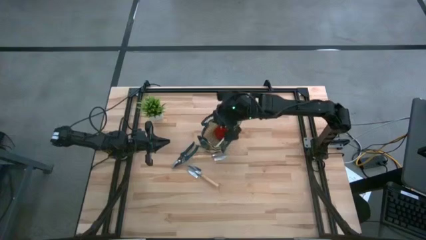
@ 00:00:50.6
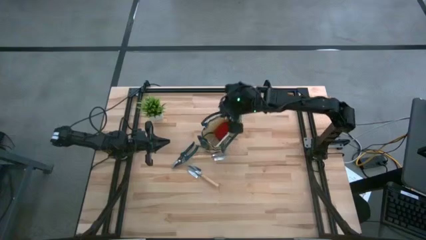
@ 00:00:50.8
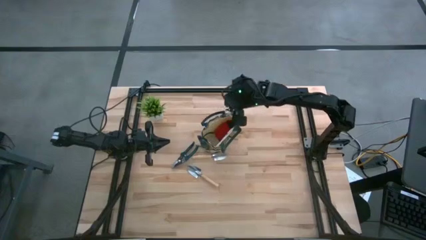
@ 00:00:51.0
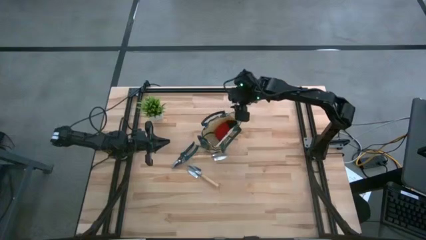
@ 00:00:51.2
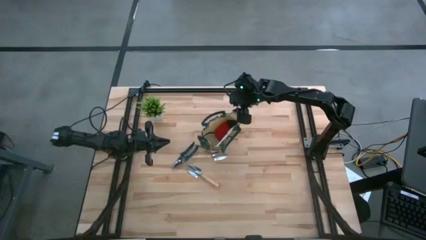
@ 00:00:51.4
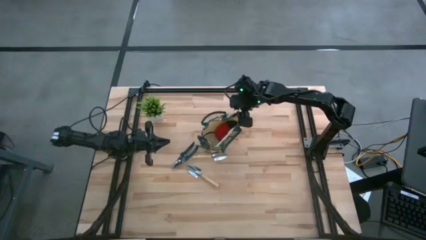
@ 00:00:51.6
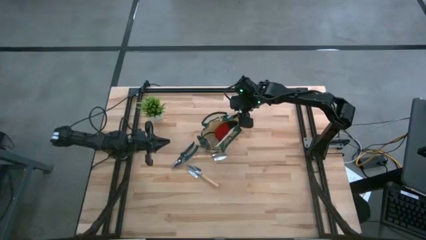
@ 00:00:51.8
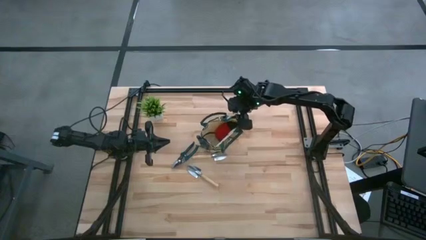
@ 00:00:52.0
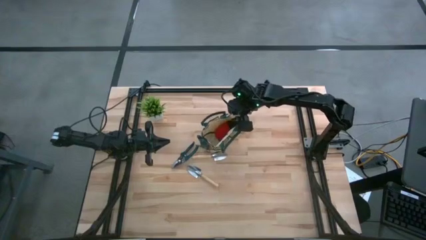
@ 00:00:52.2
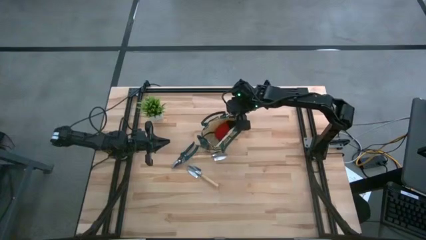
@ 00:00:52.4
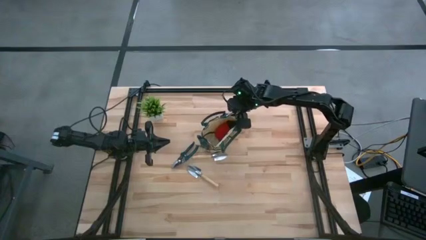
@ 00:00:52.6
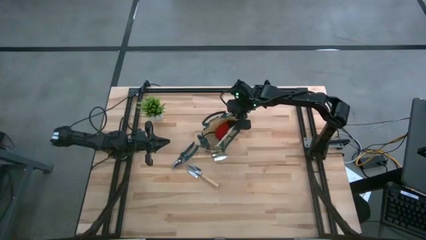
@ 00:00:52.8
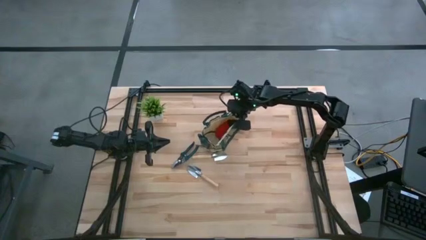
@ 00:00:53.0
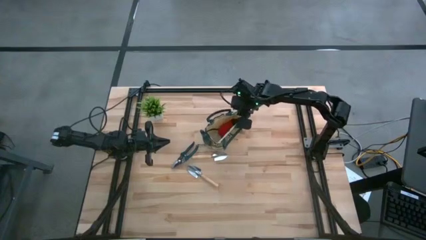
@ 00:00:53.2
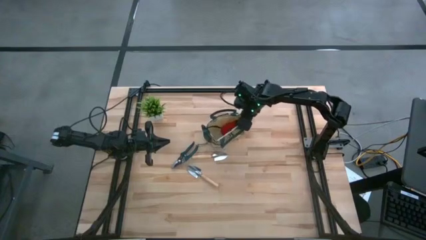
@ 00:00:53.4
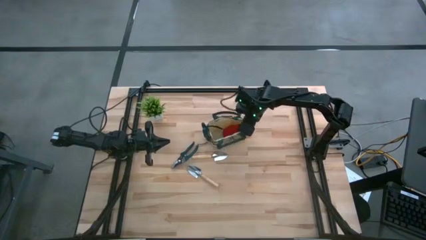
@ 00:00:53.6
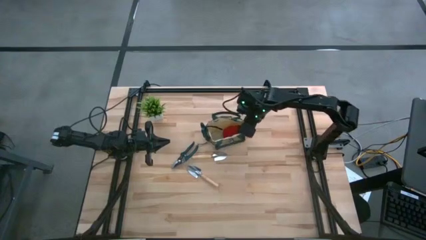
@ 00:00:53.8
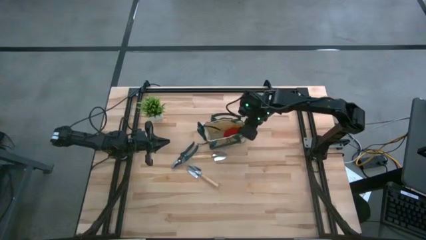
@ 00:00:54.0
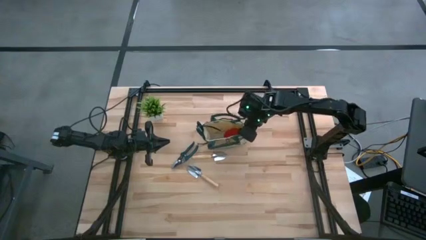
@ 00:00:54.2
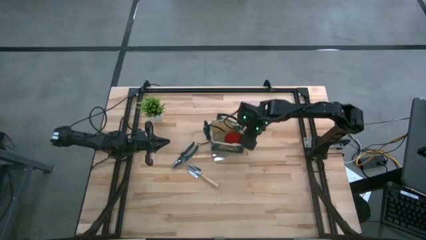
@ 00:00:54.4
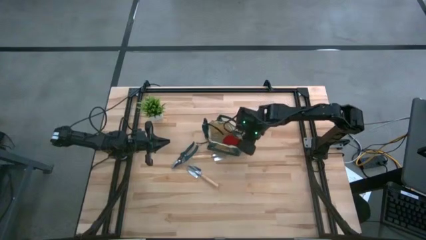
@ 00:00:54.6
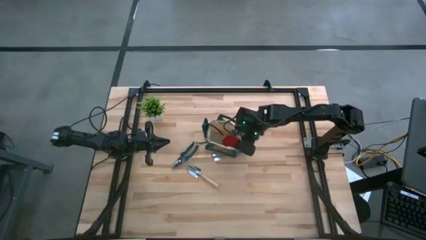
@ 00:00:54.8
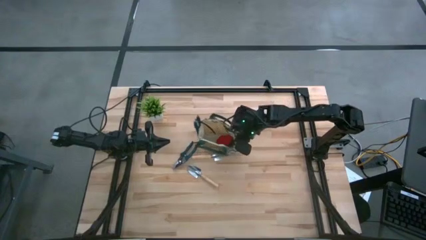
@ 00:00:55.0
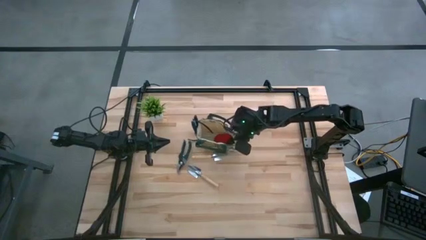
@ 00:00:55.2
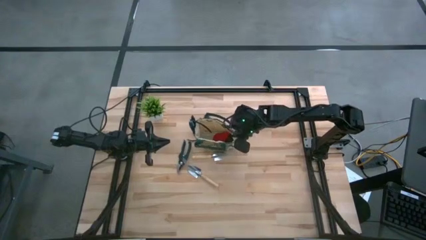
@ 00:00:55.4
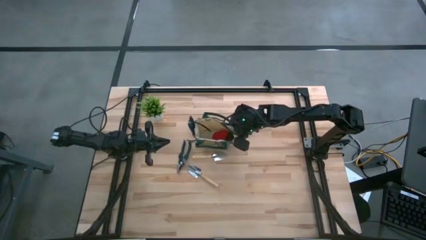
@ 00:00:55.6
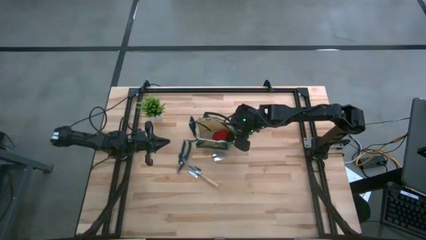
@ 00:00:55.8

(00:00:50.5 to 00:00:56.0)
Task: Pick & Place Garden tools in Gardening bag
Adjust the green bag

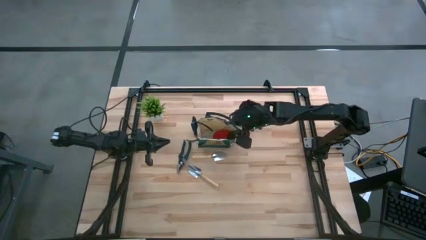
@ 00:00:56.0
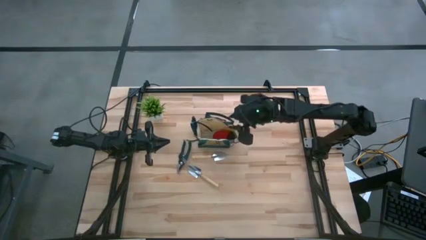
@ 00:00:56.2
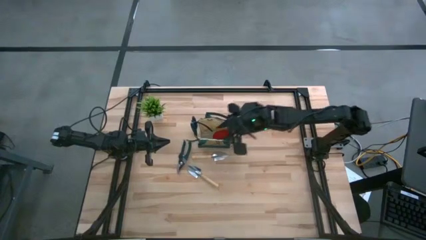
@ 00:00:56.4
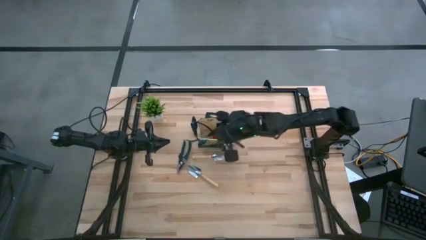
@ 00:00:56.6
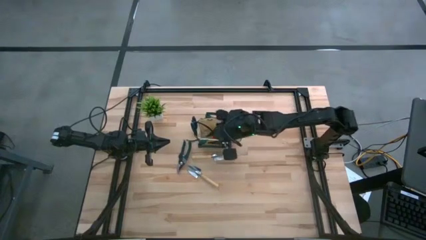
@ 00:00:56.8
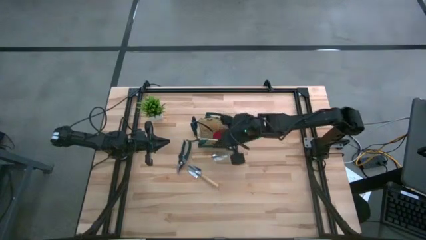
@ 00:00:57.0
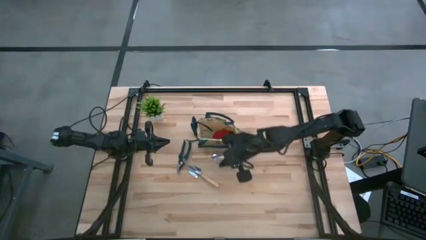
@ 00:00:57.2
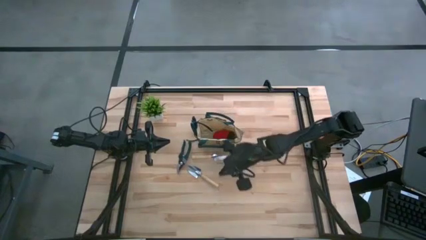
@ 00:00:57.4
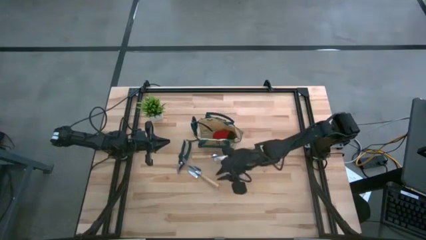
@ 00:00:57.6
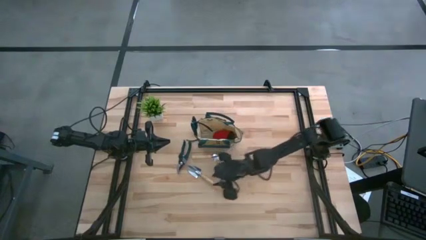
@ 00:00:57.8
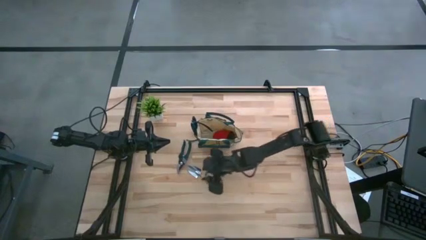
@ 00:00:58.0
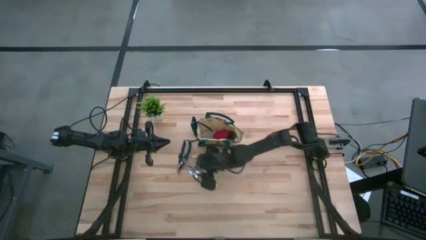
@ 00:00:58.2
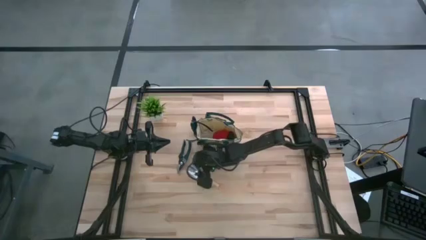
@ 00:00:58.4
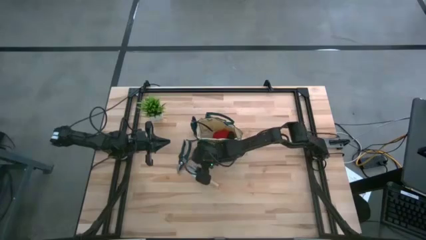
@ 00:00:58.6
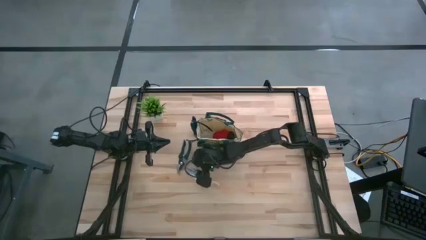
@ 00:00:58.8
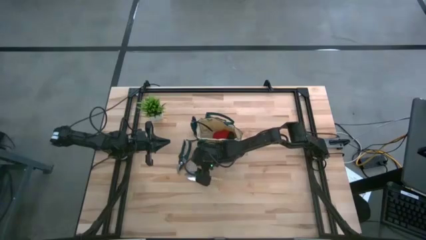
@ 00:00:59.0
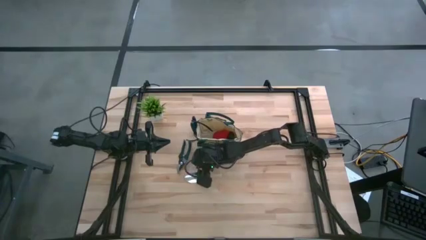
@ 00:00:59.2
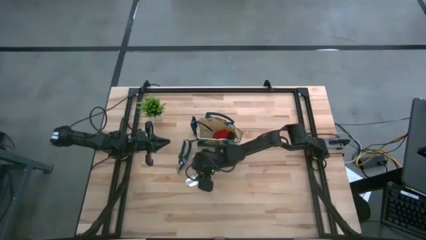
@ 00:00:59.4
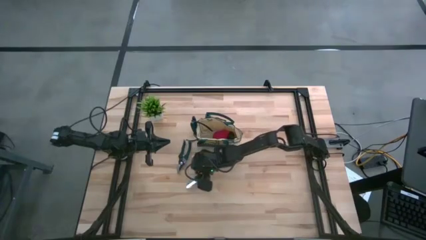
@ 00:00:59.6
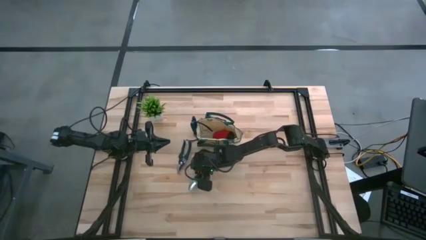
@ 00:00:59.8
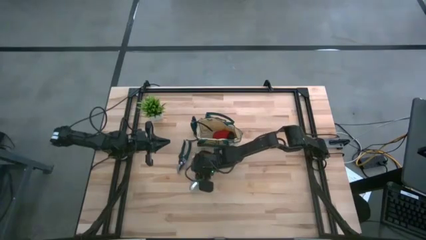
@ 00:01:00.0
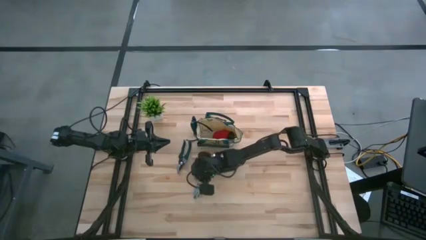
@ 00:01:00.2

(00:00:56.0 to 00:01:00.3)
Put the bottom brown trowel into the green bag

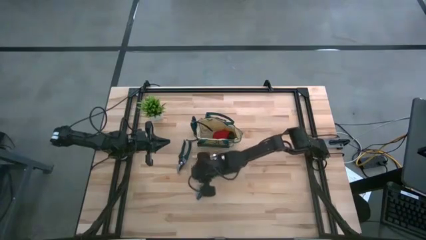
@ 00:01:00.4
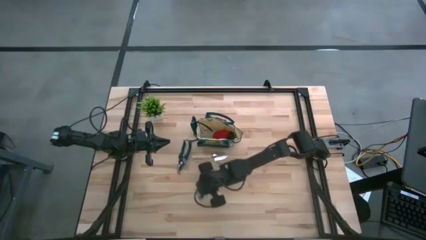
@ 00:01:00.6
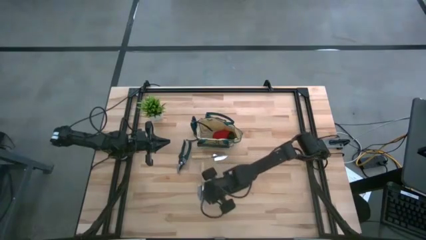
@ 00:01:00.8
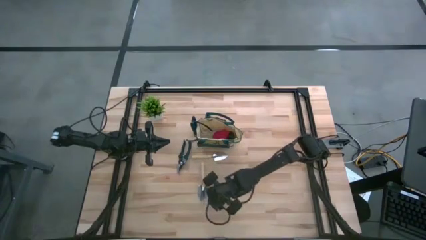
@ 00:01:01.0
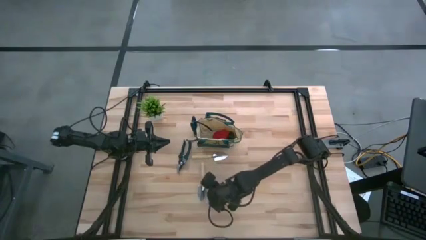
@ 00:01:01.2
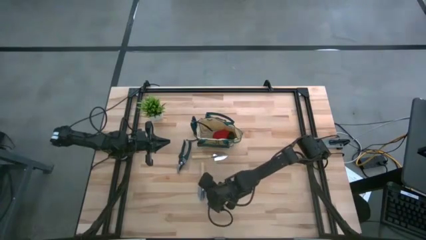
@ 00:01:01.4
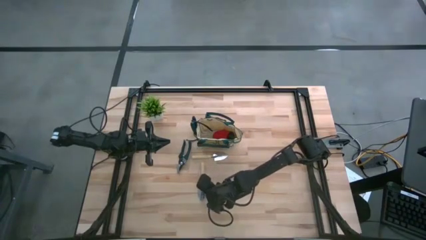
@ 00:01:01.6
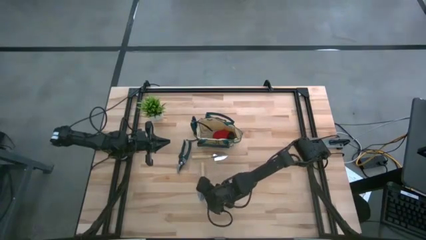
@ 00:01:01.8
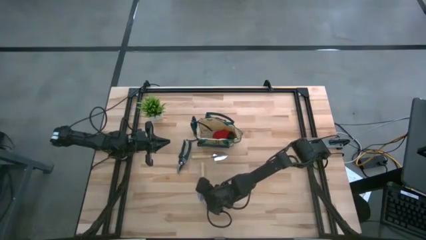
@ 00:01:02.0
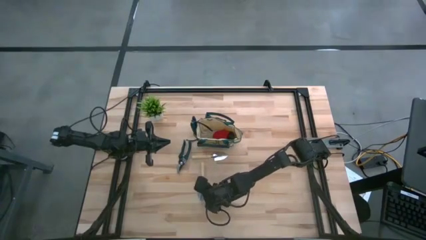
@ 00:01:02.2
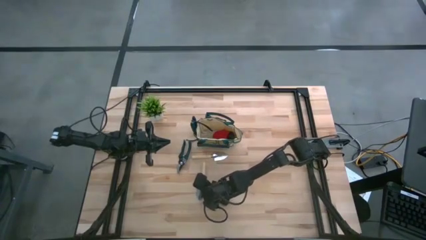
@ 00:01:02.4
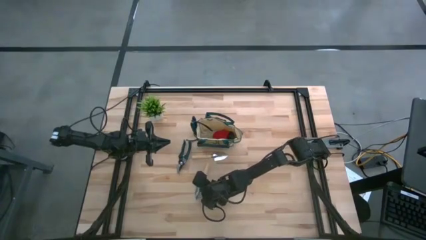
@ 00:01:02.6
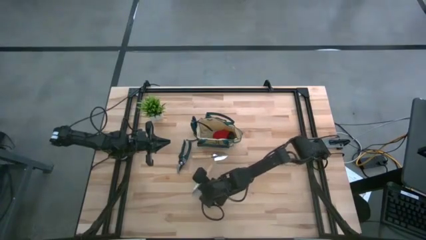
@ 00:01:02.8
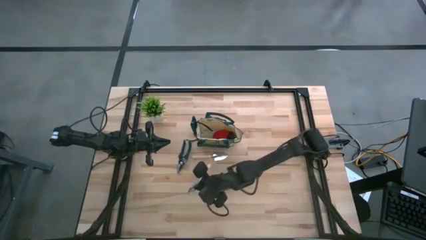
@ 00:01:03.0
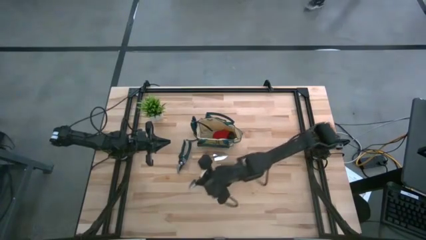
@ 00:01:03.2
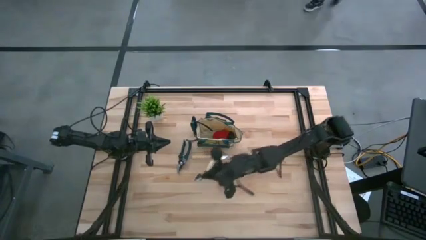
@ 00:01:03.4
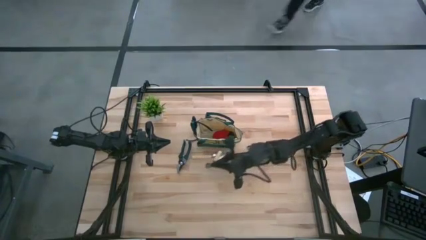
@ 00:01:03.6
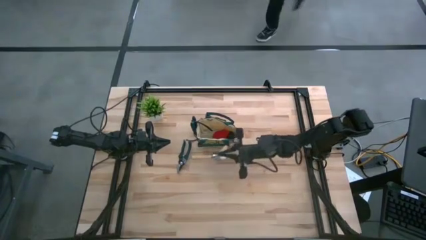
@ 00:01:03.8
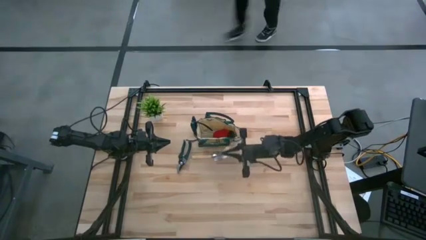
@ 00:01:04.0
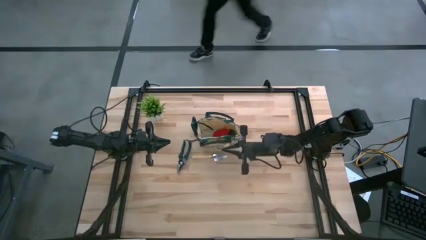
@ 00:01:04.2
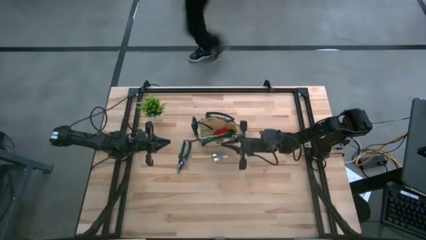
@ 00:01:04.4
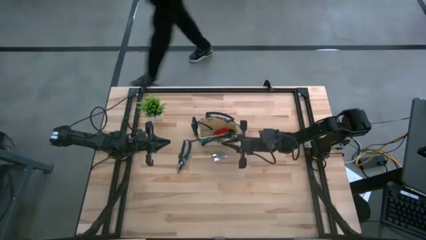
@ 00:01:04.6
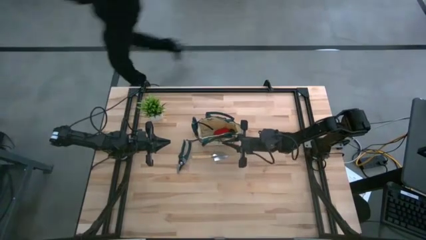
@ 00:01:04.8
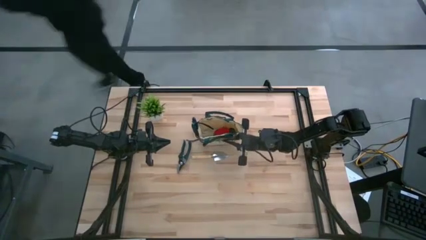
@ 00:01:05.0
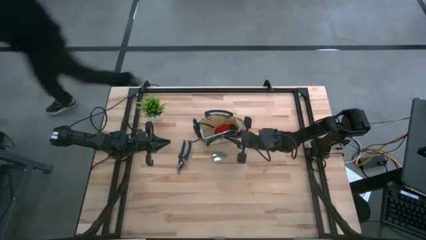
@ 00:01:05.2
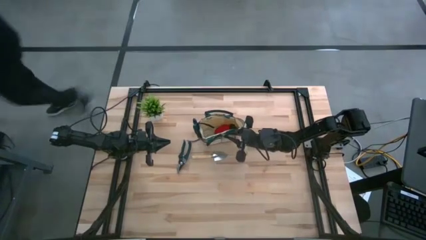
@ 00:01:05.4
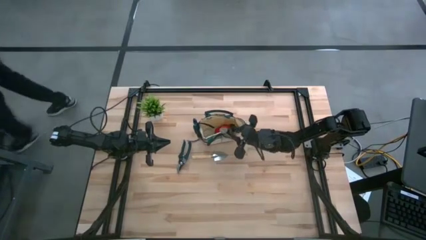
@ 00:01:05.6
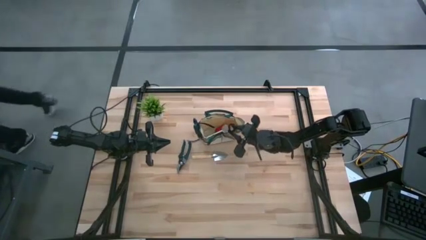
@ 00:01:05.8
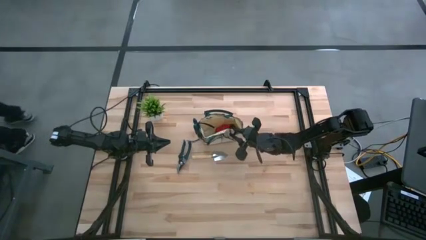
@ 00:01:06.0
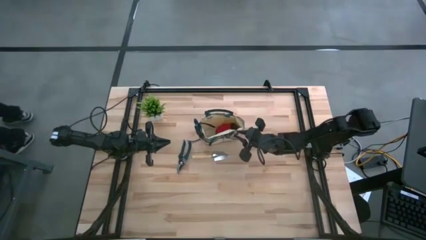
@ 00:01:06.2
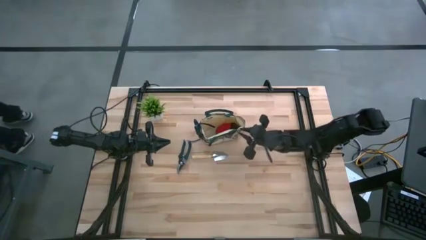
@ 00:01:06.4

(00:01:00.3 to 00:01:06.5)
Put the bottom brown trowel into the green bag
